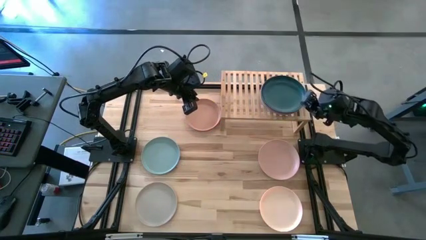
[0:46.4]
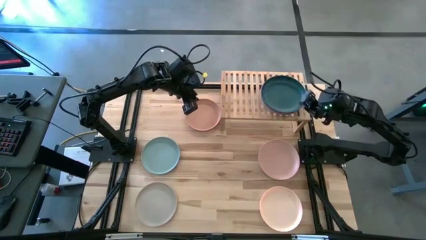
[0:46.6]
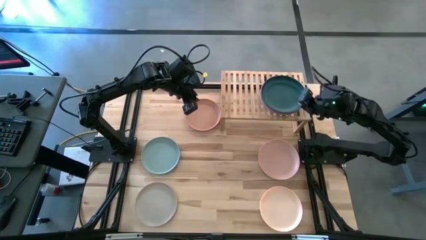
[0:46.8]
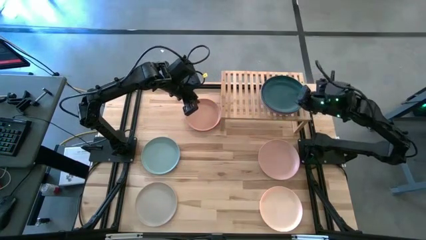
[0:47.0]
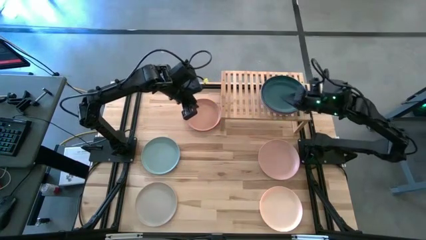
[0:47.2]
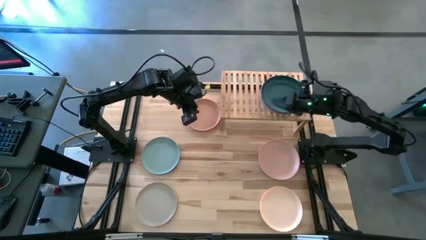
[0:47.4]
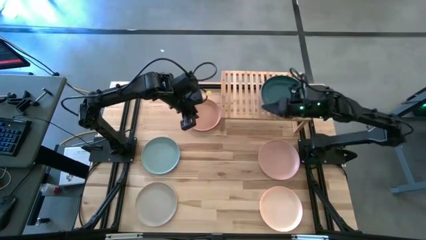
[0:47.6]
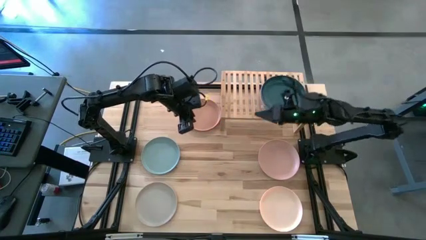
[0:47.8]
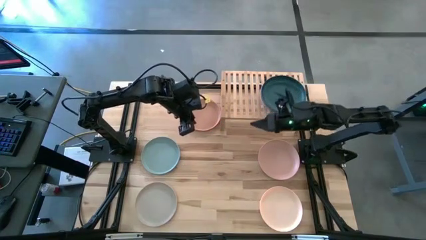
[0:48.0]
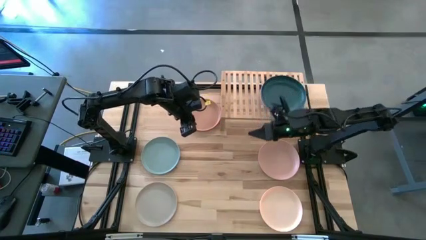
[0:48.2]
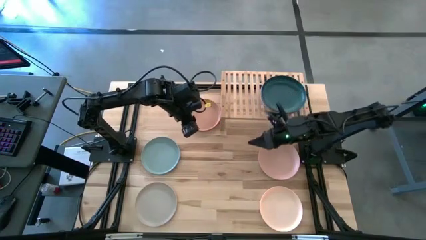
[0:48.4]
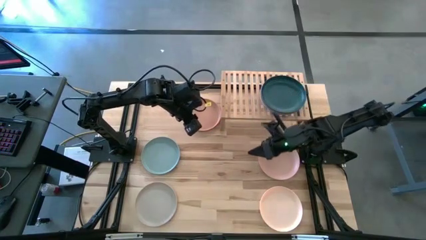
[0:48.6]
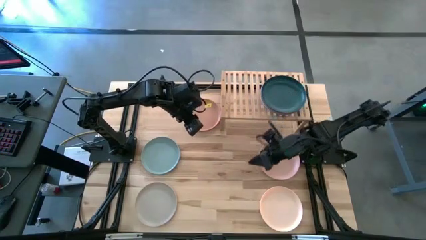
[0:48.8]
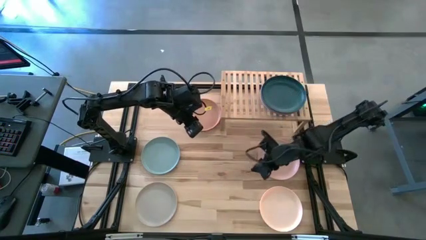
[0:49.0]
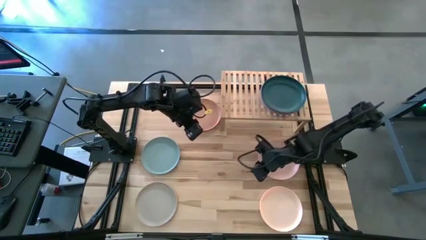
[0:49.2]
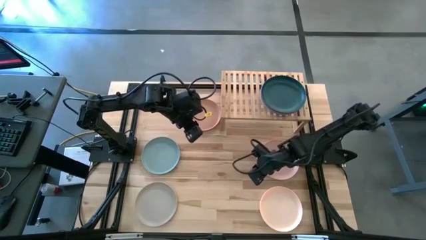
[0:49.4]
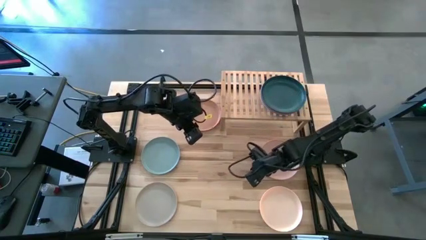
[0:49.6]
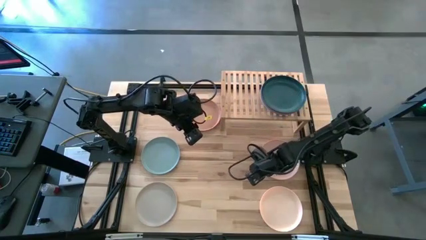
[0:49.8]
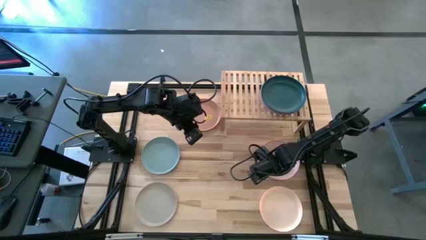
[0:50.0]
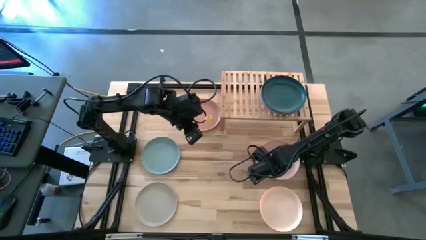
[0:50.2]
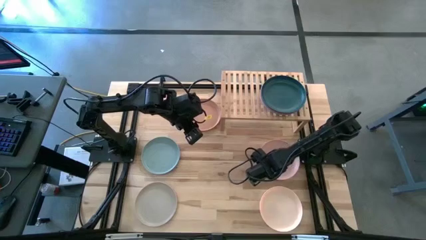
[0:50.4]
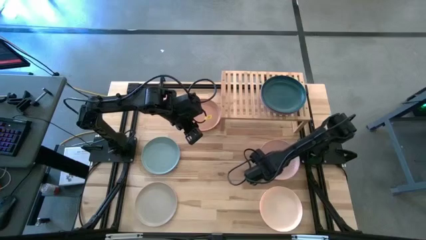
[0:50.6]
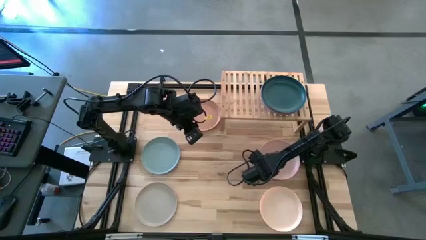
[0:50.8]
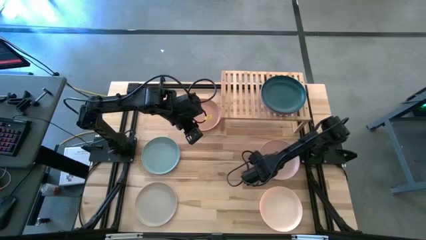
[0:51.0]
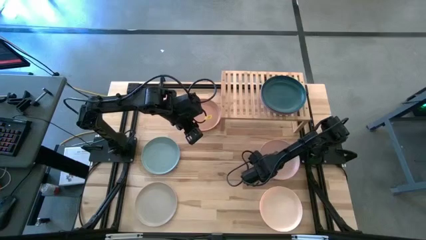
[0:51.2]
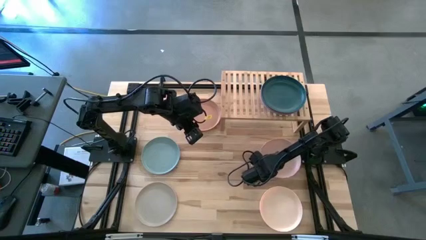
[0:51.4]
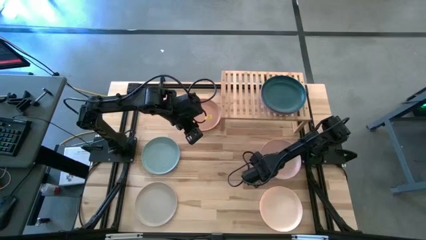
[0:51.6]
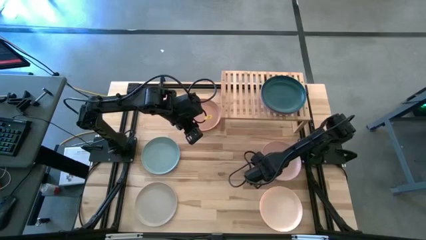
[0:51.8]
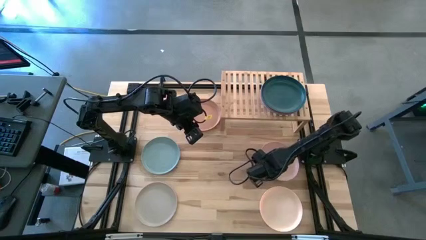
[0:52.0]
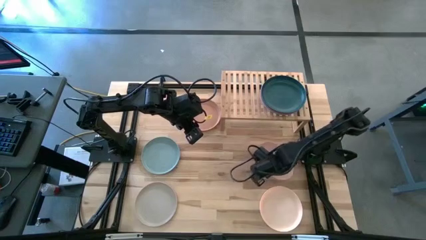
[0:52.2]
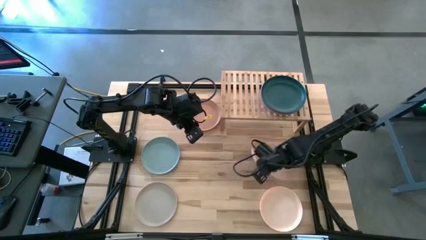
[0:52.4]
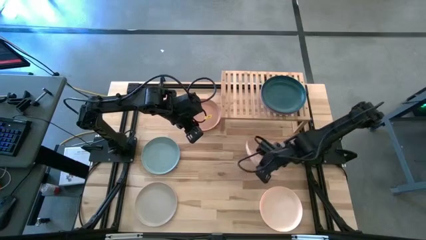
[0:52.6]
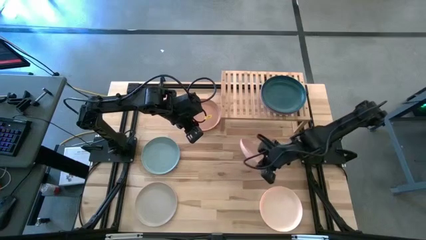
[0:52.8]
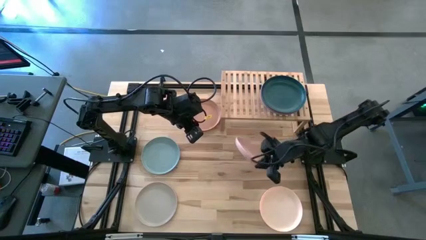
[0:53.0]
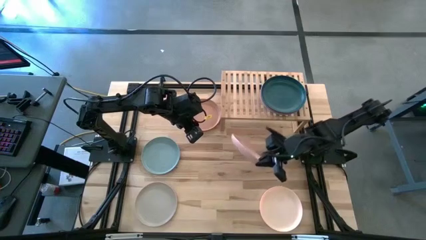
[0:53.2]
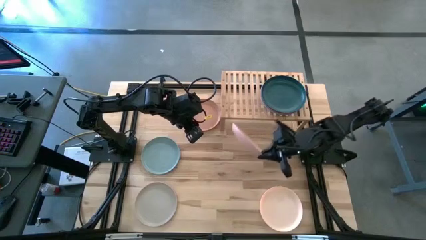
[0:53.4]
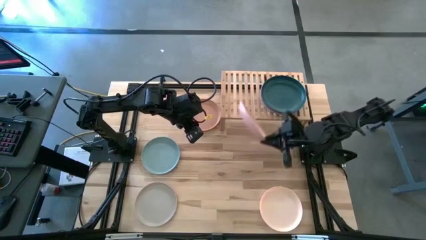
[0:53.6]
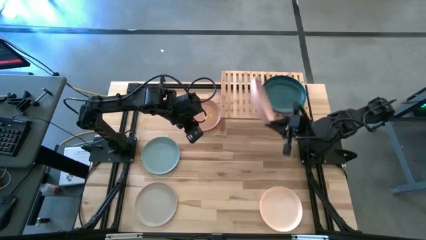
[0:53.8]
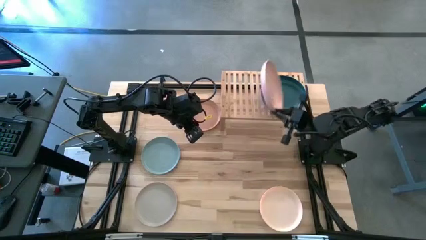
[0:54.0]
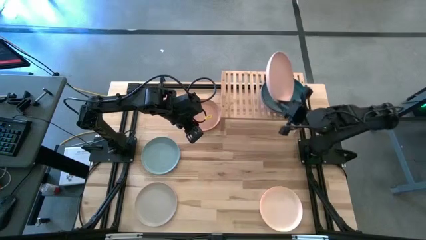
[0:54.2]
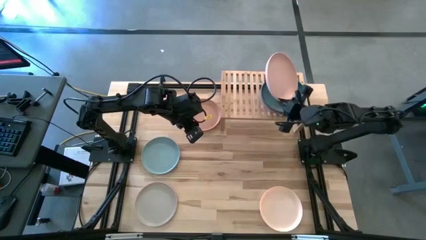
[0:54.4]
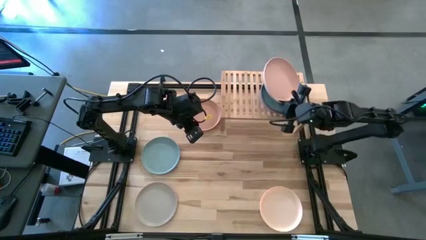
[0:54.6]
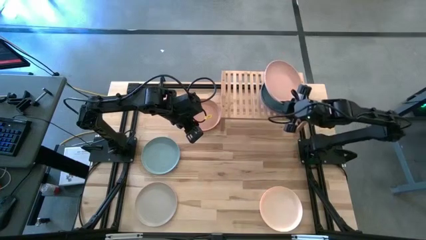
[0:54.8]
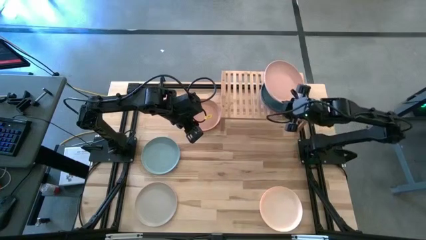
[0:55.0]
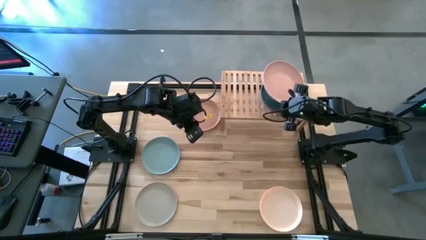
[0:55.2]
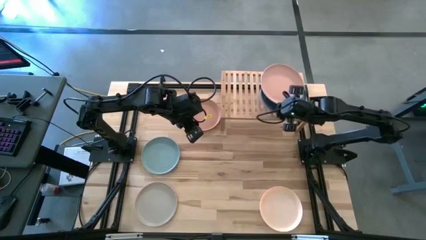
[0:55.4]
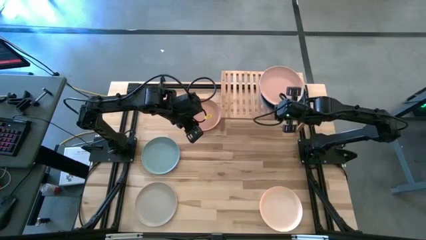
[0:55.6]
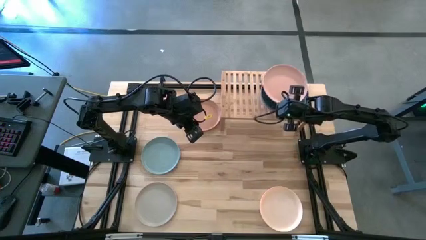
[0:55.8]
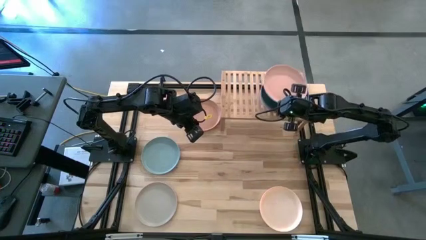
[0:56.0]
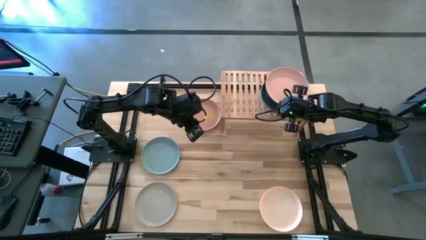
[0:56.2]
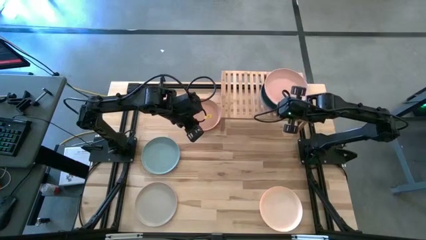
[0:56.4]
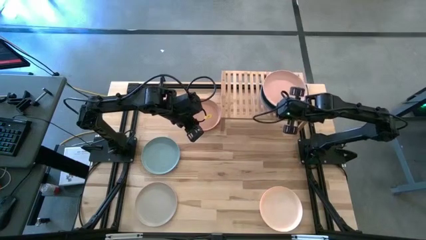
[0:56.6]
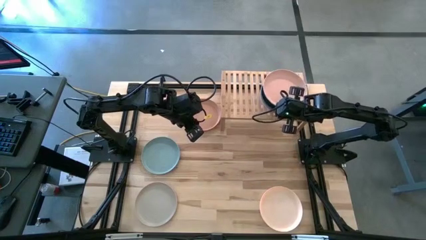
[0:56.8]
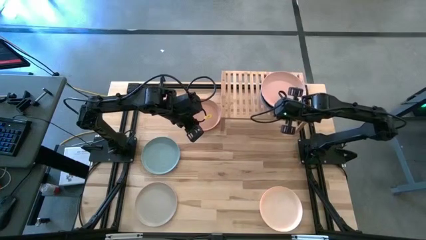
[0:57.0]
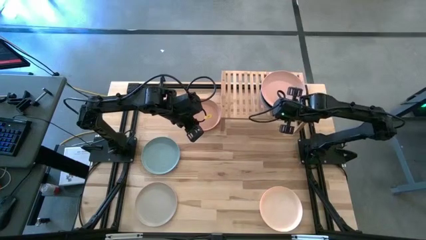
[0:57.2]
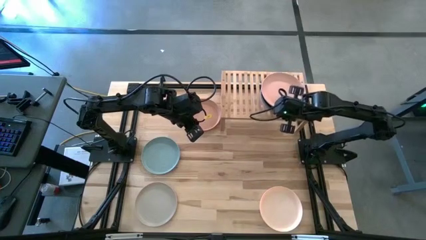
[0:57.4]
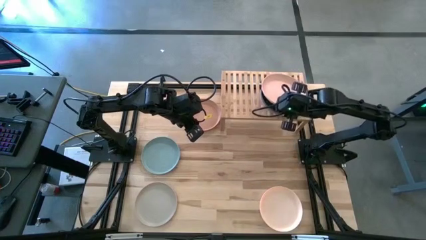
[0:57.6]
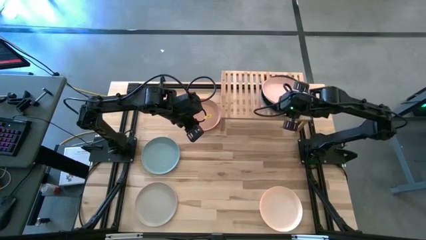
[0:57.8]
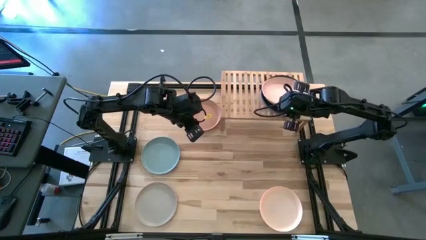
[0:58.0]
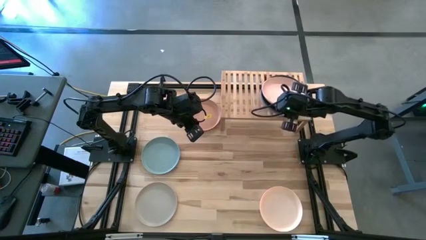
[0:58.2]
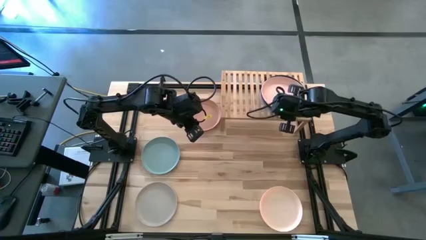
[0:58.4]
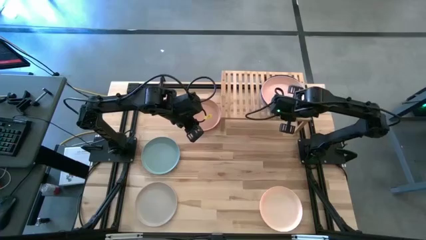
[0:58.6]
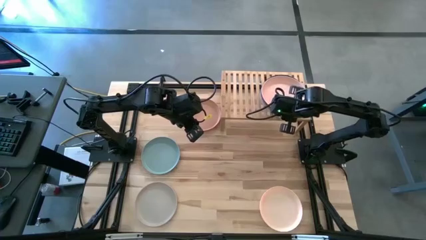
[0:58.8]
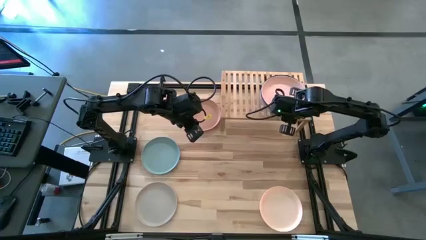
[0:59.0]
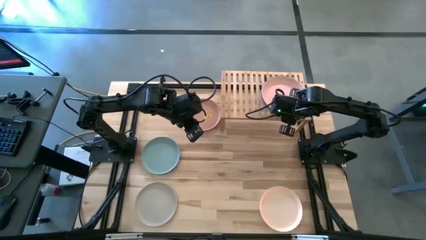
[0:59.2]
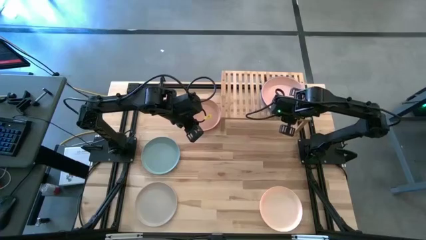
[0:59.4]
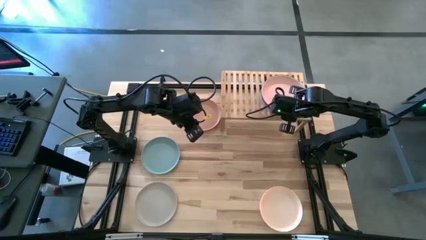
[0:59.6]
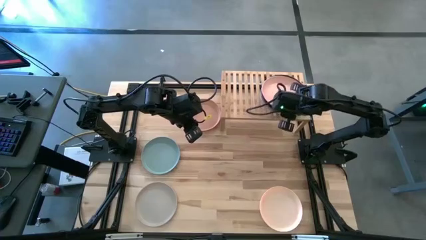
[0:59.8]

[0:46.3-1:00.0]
Task: Place and stack plates onto a shelf
Stack the pink plate on the dark green plate on the shelf
